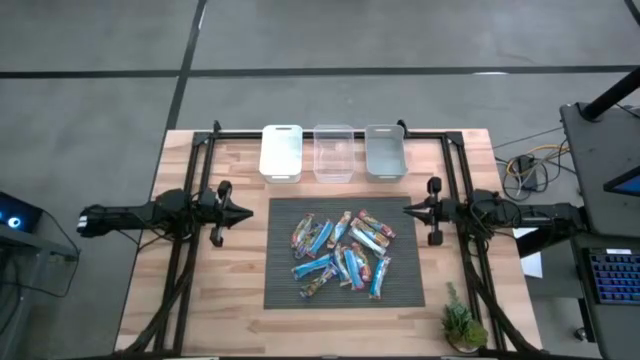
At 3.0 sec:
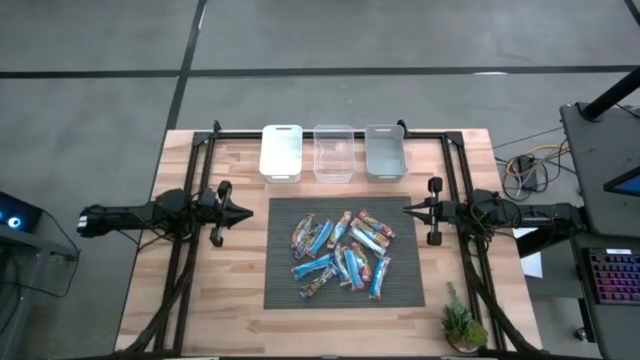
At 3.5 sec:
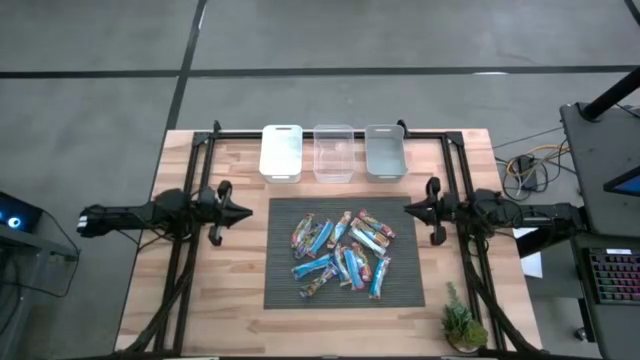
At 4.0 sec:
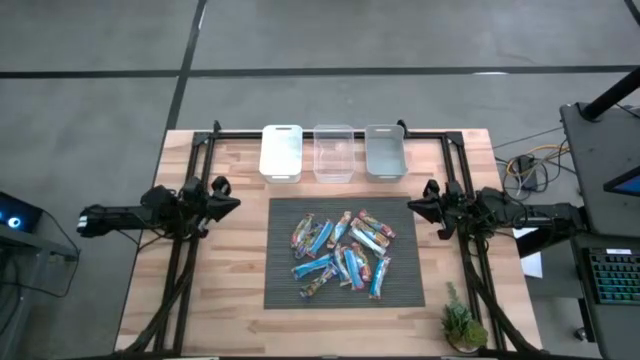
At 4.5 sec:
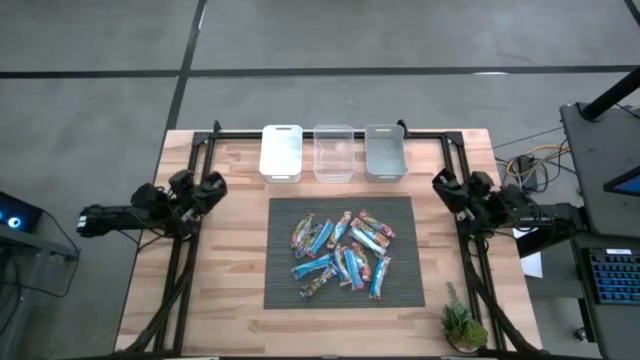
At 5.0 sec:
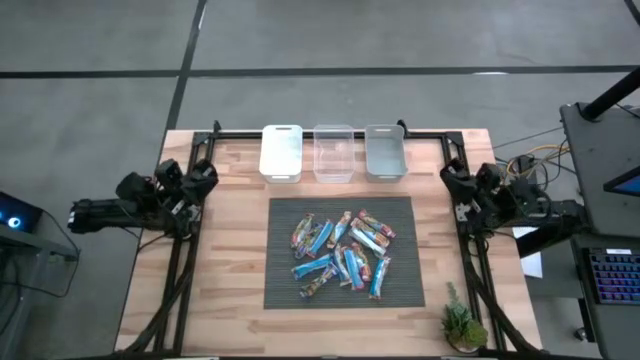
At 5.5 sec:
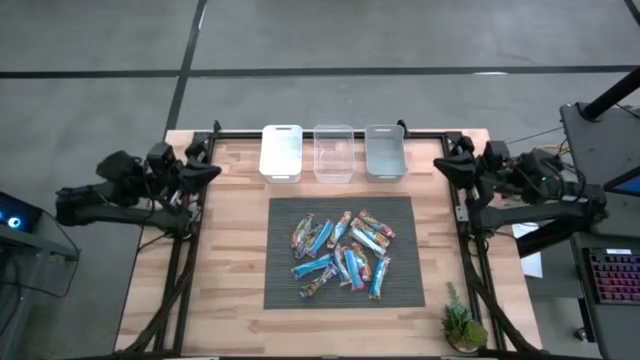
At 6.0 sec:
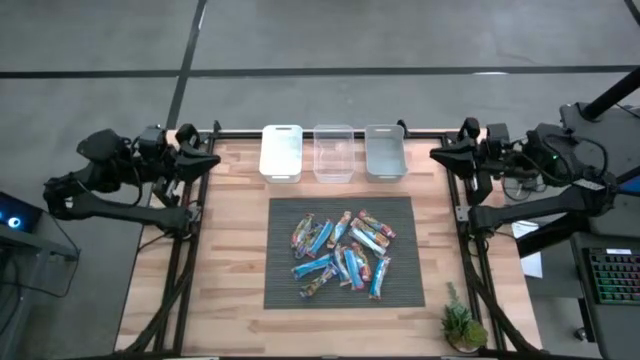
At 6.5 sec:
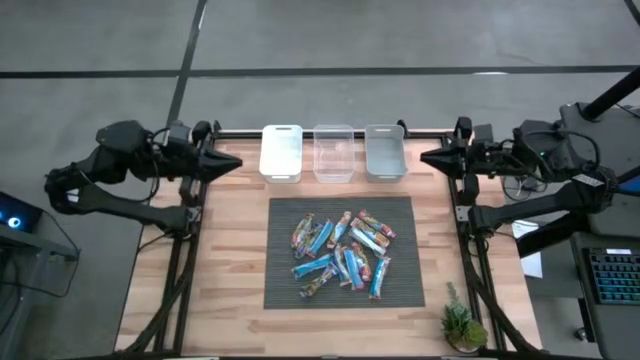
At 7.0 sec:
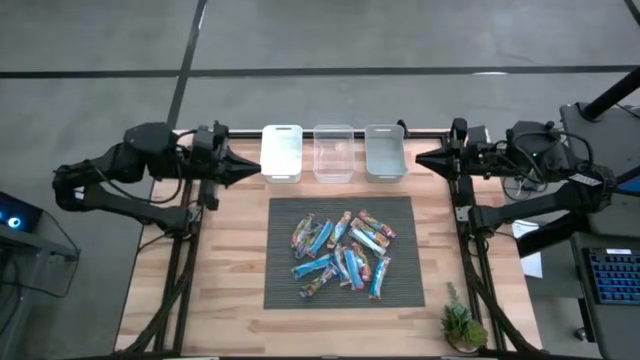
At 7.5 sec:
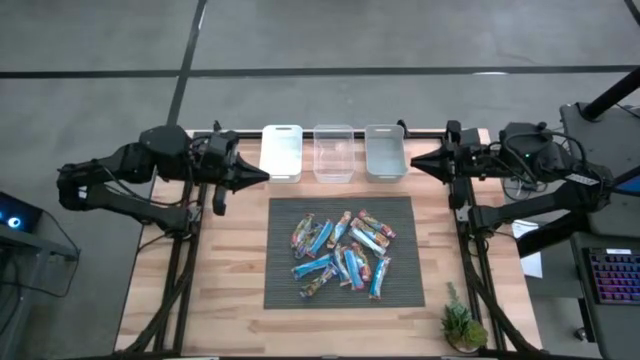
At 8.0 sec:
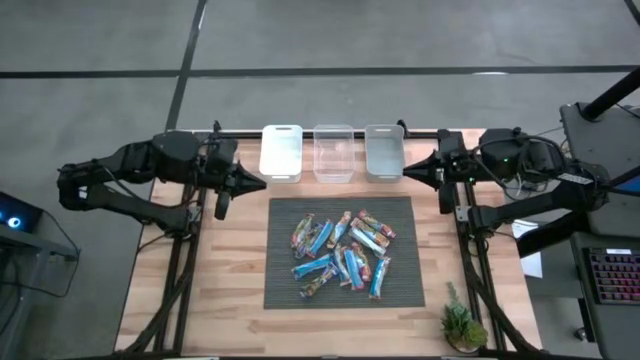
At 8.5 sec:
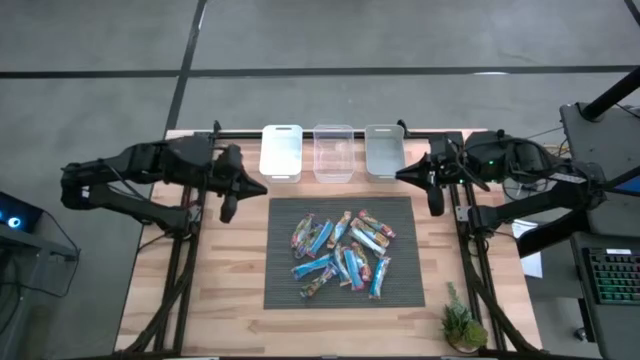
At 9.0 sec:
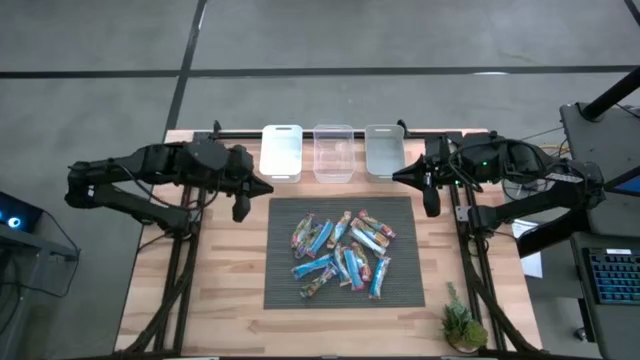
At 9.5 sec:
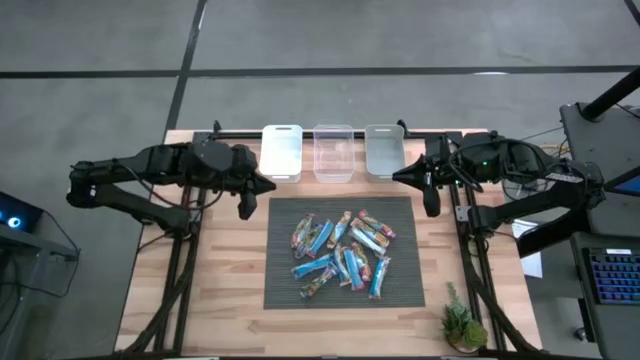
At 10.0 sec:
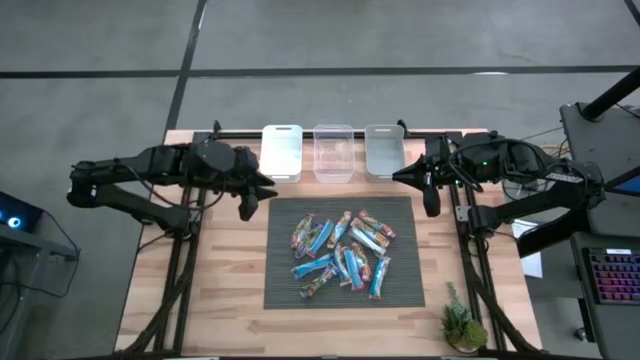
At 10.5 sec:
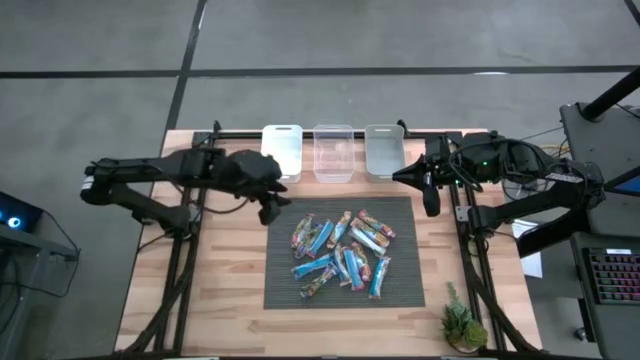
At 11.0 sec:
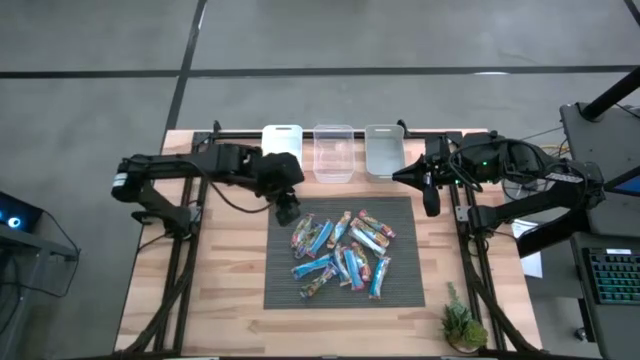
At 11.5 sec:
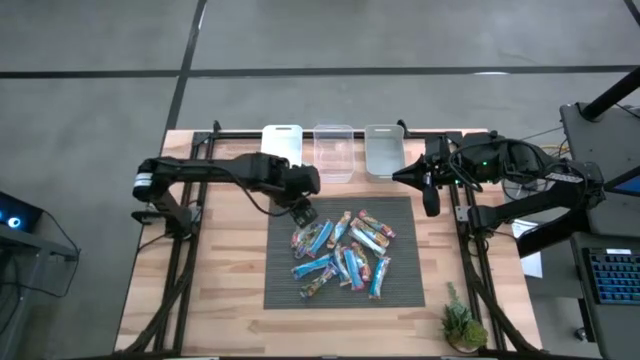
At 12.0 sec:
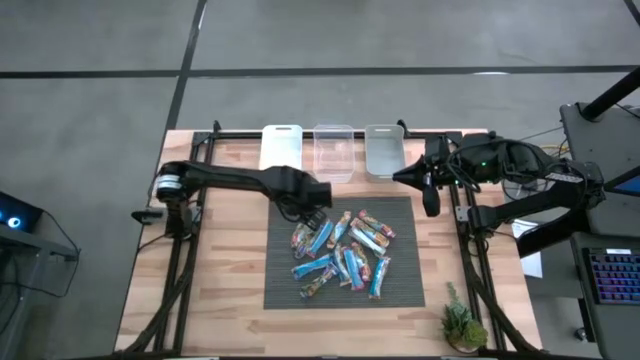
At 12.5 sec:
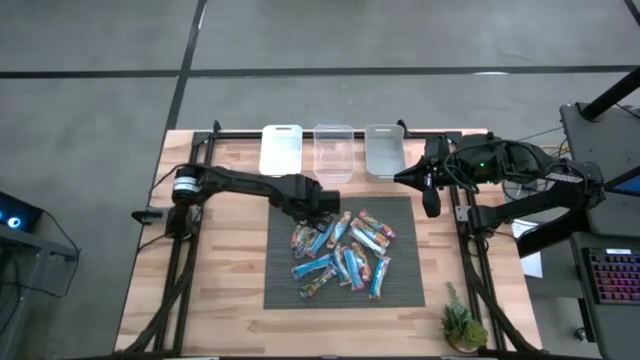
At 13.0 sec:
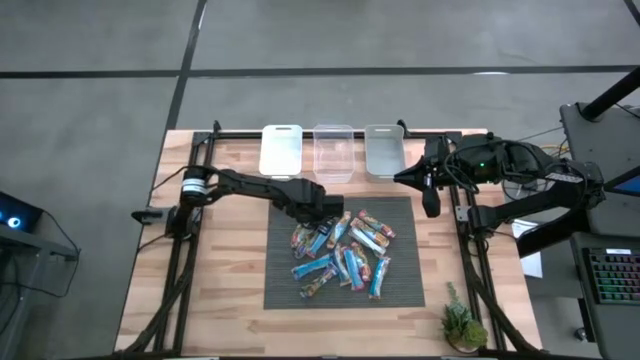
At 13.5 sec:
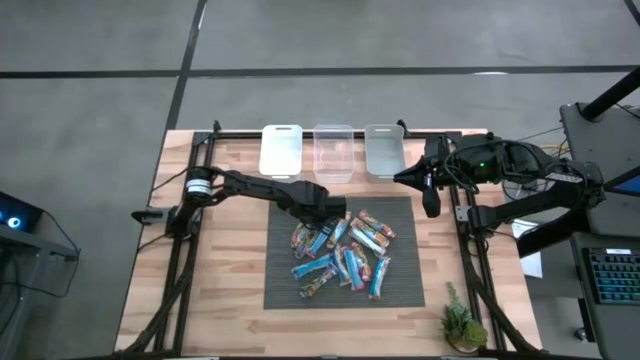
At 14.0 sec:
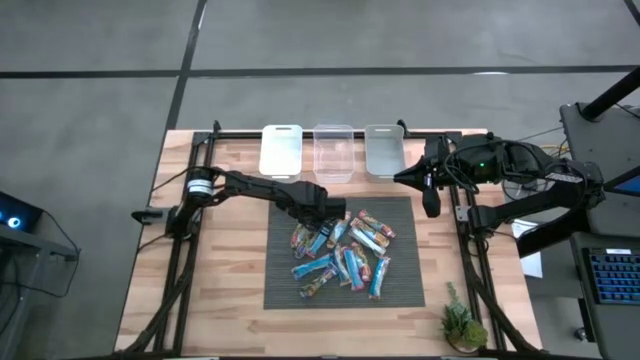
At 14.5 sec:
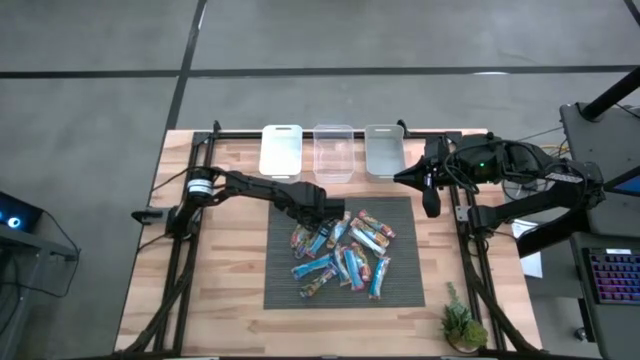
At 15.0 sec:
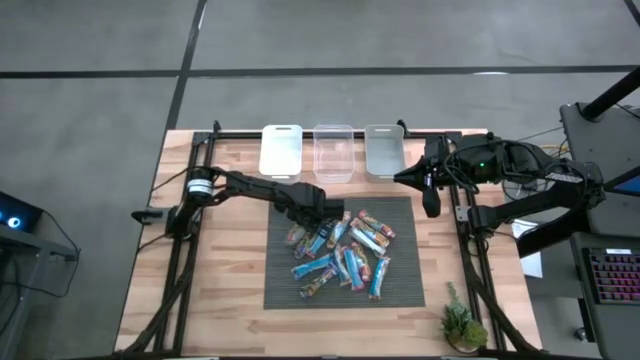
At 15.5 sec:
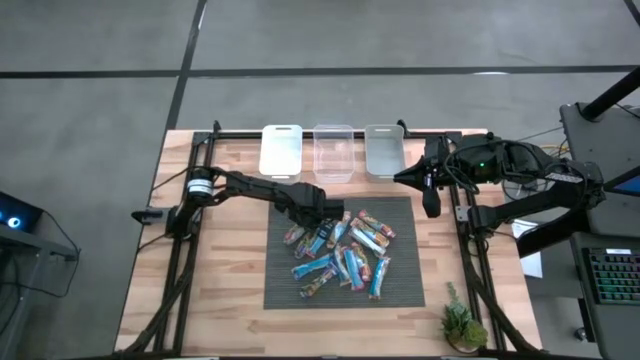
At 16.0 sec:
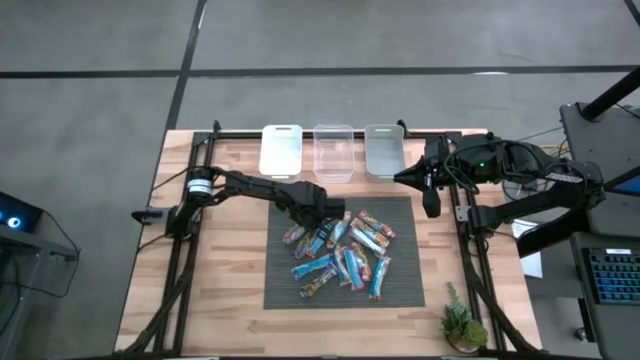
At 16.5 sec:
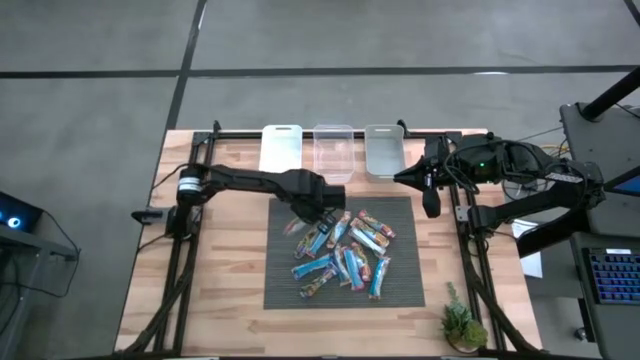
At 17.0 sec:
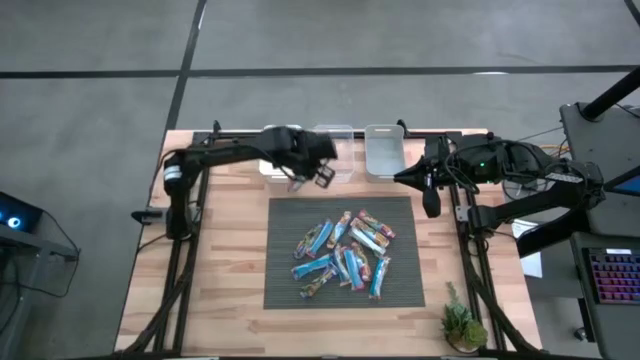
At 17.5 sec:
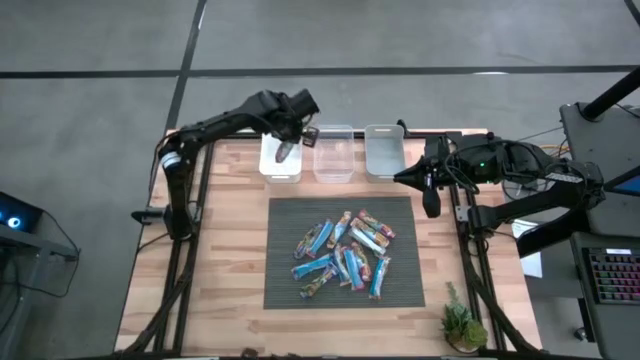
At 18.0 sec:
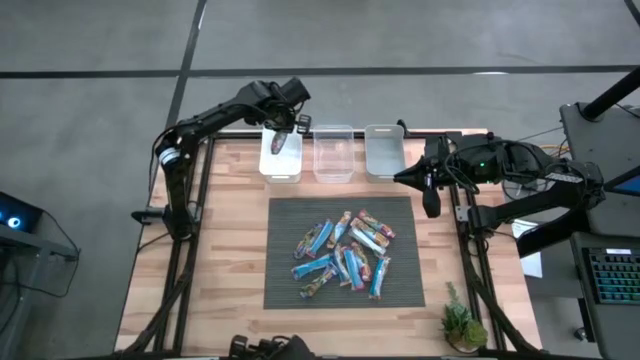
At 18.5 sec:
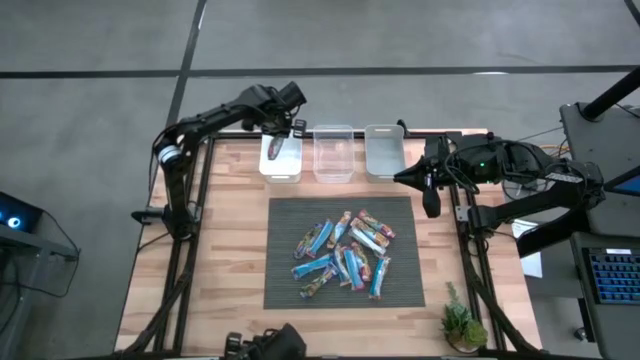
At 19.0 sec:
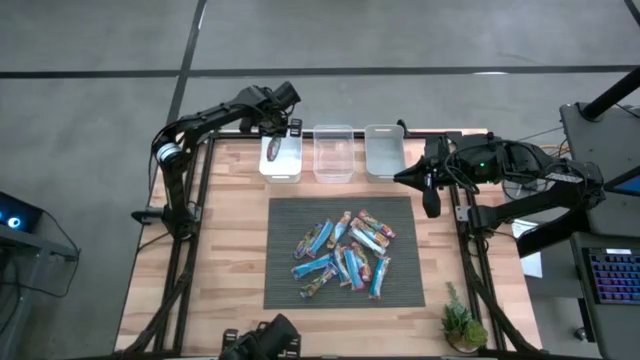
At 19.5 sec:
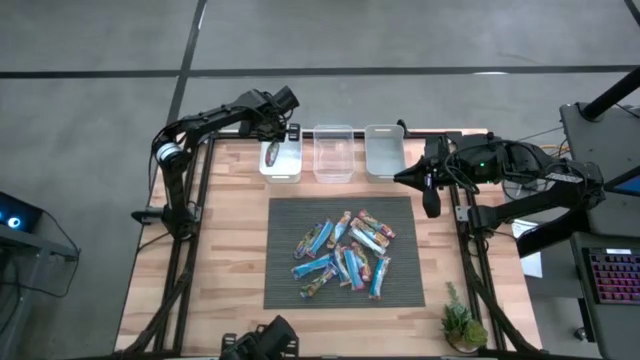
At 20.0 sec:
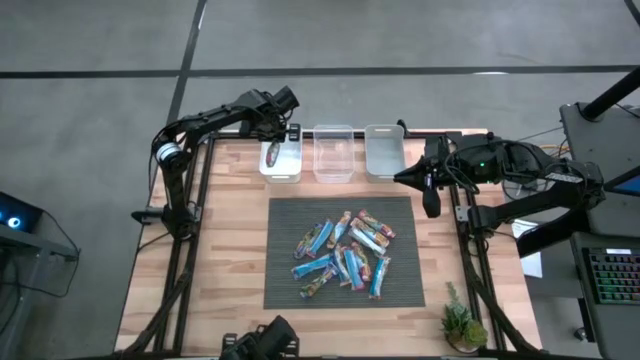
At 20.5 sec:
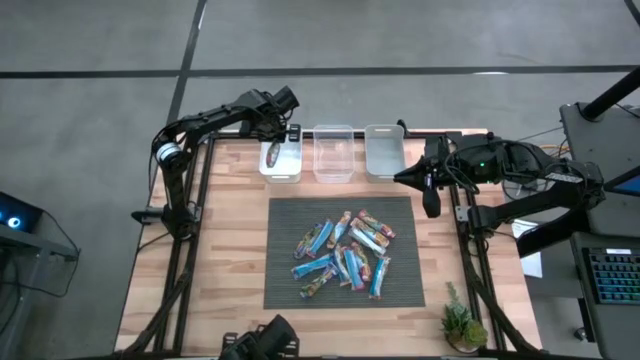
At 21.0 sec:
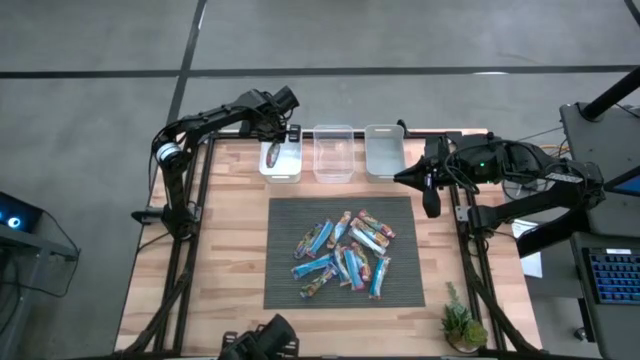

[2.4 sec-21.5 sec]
Task: Pick and place Granola Bars by type
Put the red granola bar into the white bin
